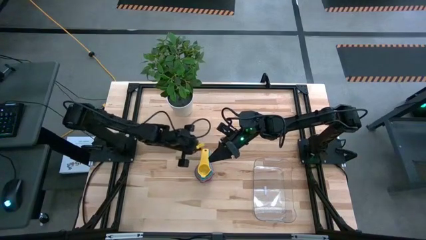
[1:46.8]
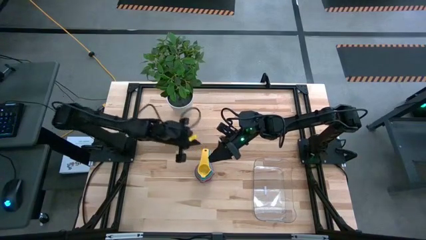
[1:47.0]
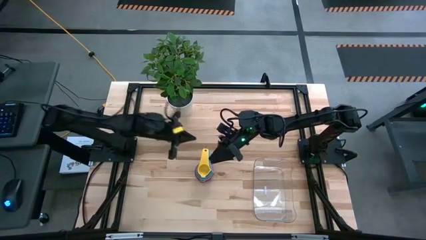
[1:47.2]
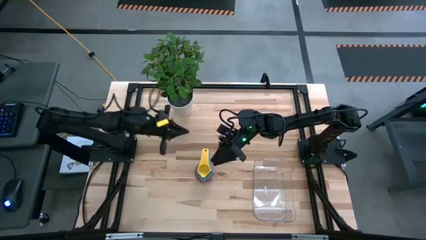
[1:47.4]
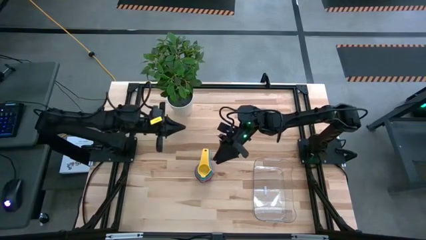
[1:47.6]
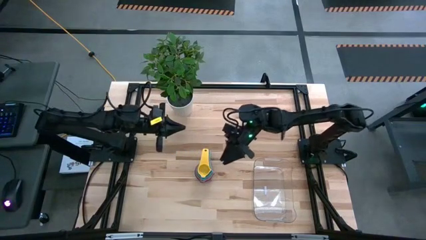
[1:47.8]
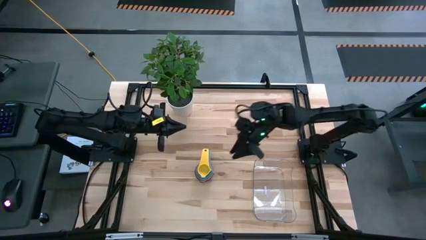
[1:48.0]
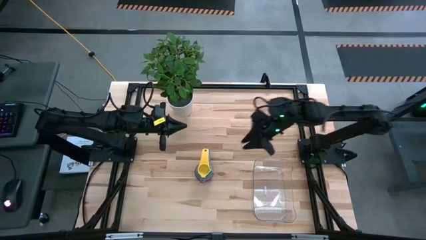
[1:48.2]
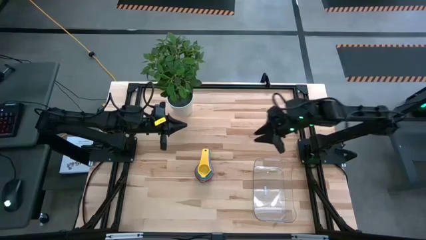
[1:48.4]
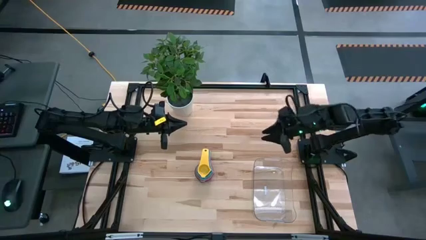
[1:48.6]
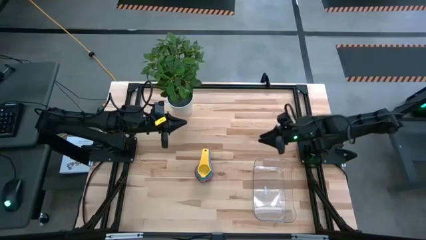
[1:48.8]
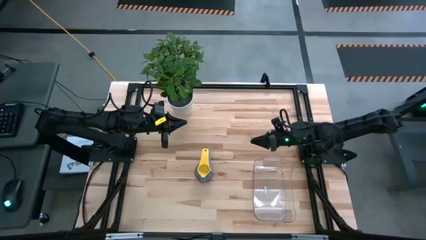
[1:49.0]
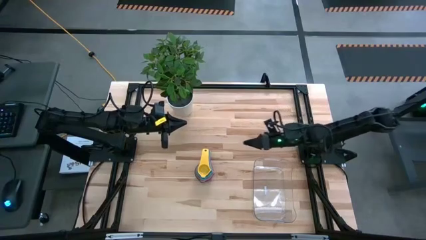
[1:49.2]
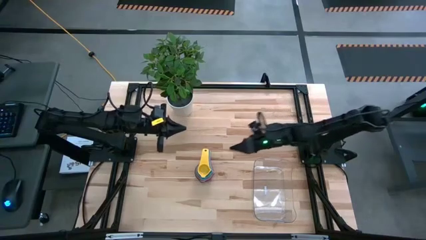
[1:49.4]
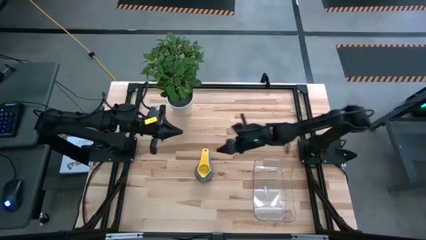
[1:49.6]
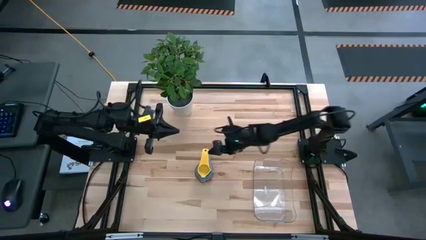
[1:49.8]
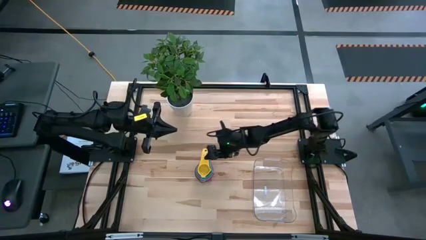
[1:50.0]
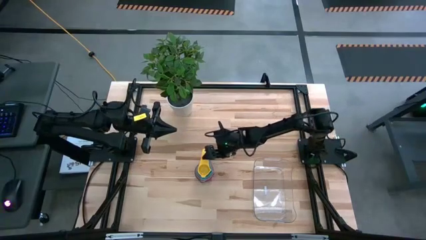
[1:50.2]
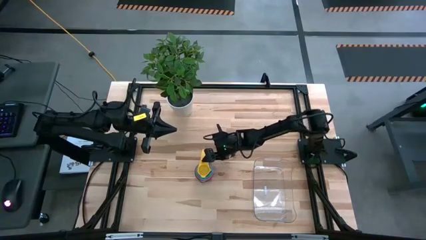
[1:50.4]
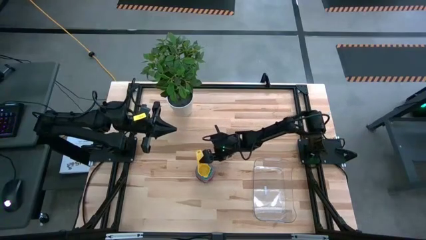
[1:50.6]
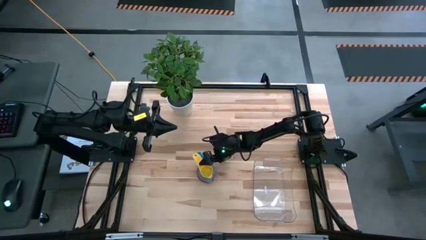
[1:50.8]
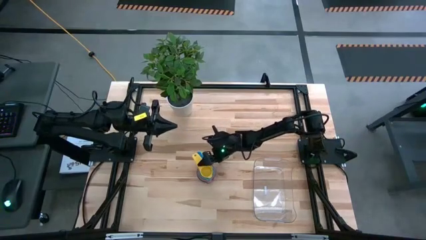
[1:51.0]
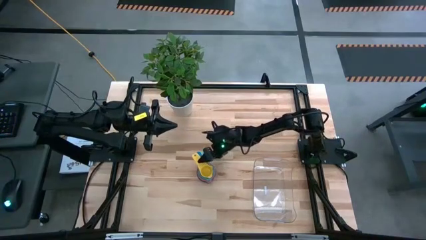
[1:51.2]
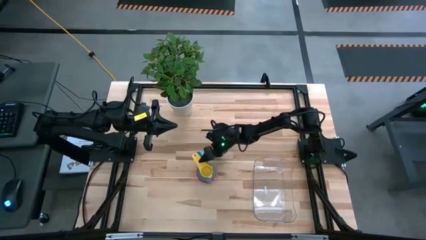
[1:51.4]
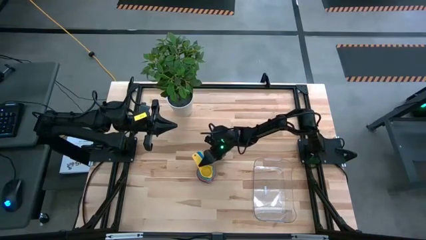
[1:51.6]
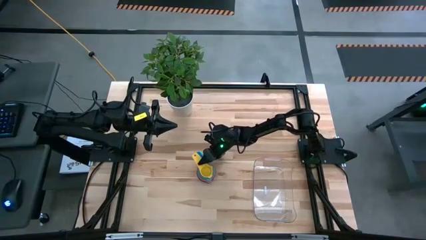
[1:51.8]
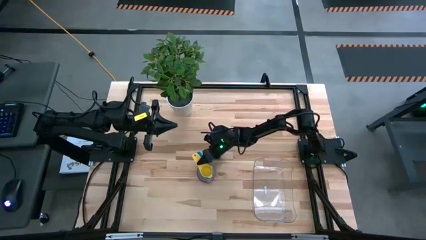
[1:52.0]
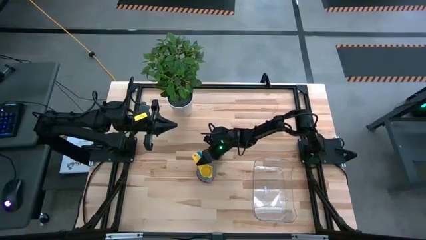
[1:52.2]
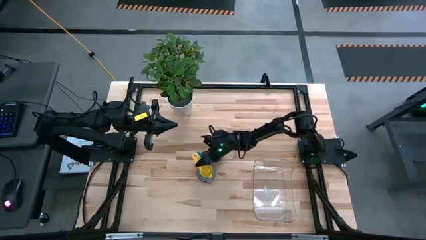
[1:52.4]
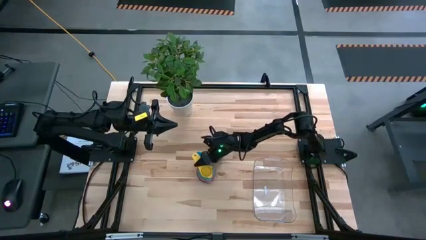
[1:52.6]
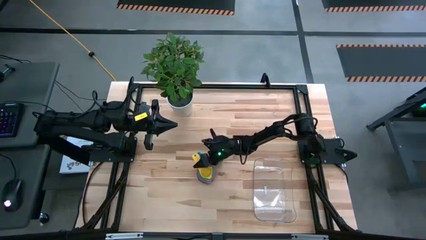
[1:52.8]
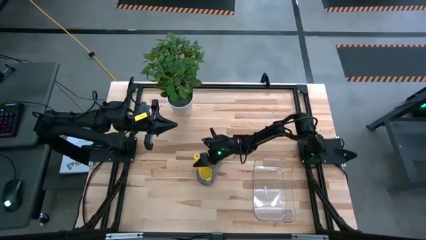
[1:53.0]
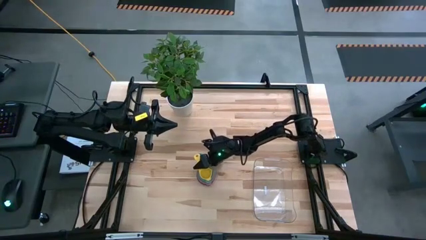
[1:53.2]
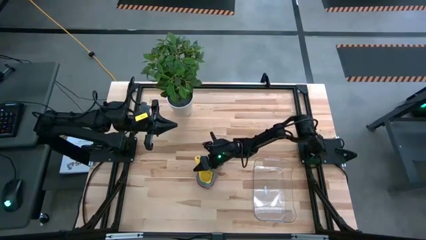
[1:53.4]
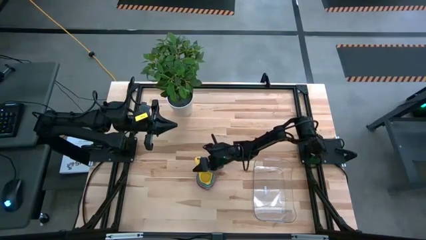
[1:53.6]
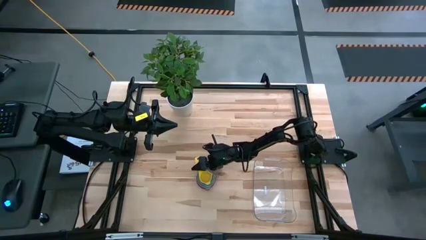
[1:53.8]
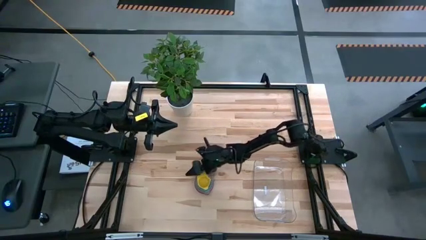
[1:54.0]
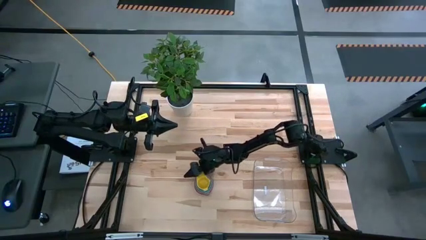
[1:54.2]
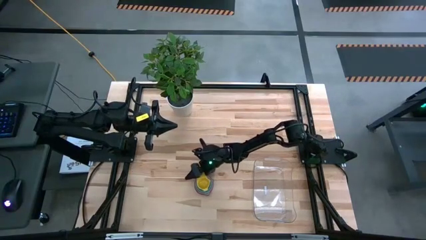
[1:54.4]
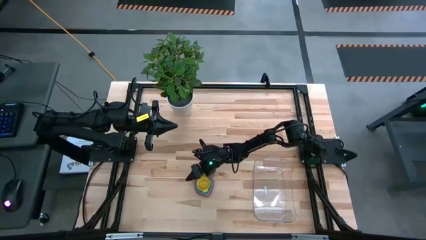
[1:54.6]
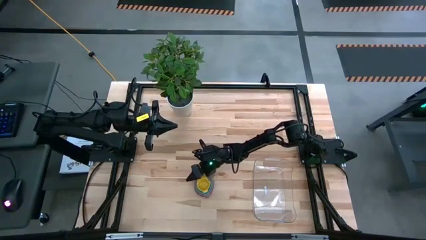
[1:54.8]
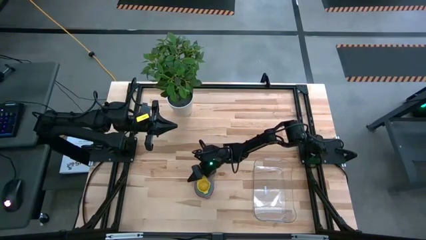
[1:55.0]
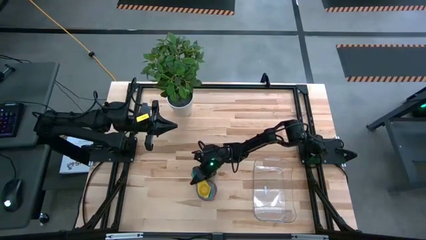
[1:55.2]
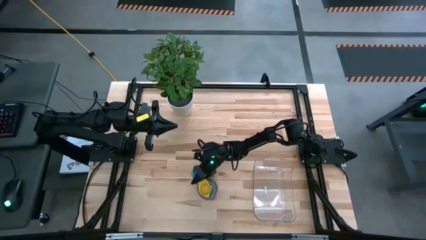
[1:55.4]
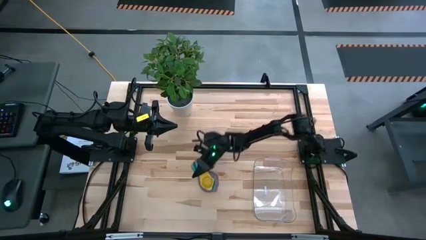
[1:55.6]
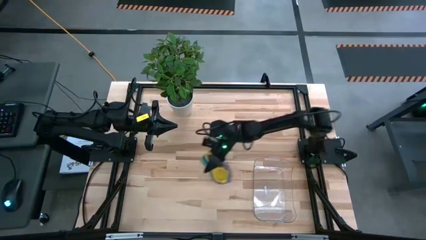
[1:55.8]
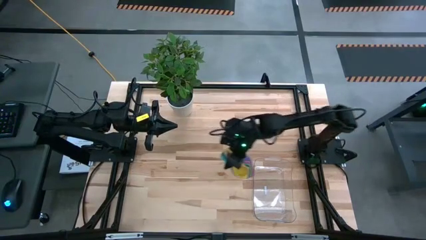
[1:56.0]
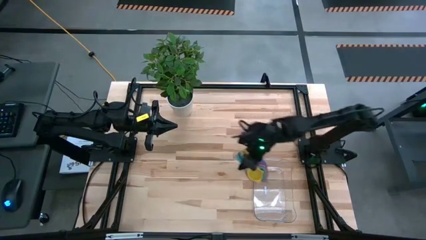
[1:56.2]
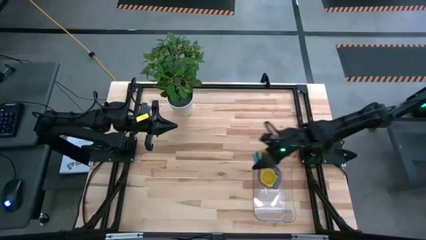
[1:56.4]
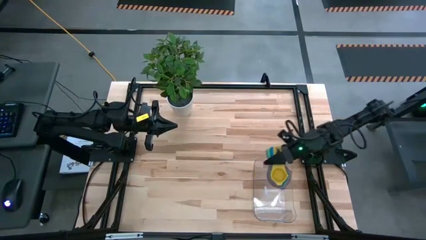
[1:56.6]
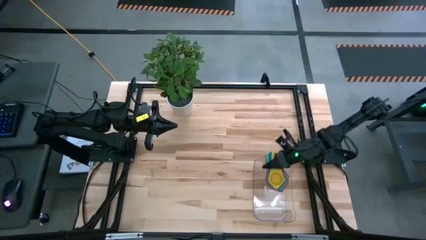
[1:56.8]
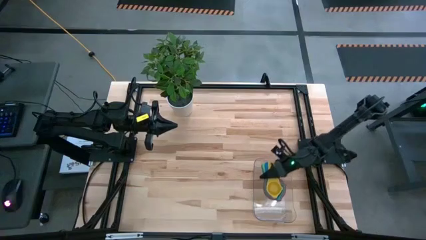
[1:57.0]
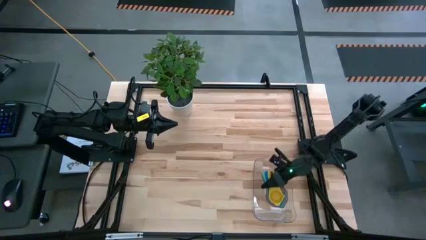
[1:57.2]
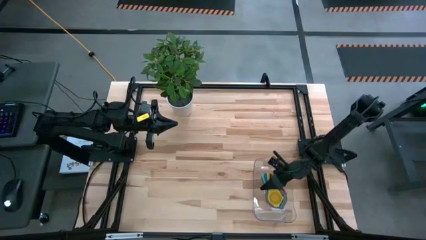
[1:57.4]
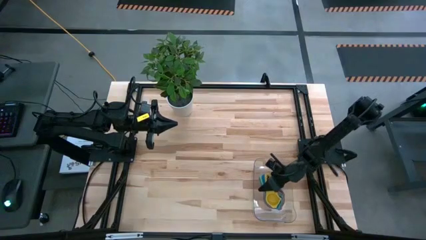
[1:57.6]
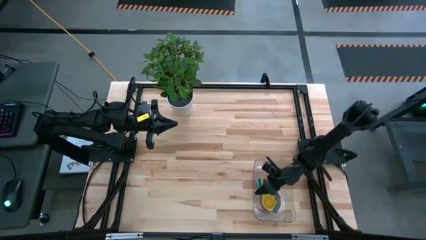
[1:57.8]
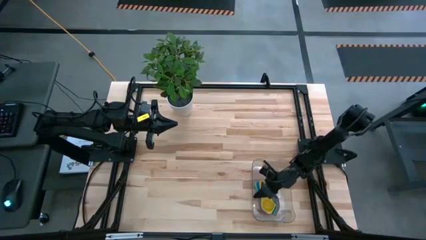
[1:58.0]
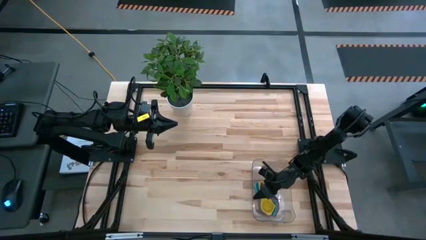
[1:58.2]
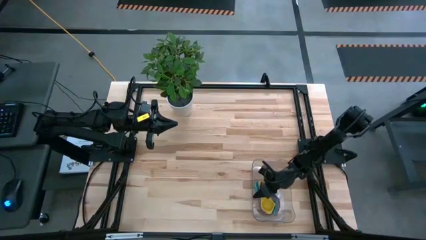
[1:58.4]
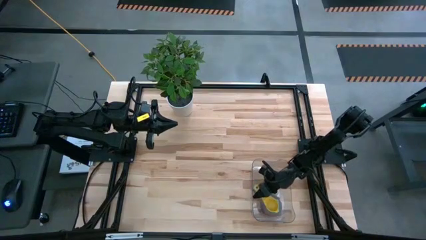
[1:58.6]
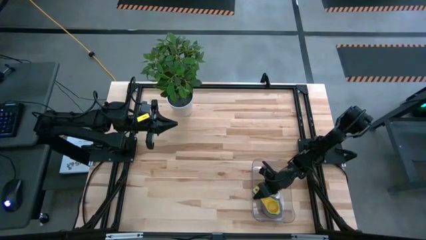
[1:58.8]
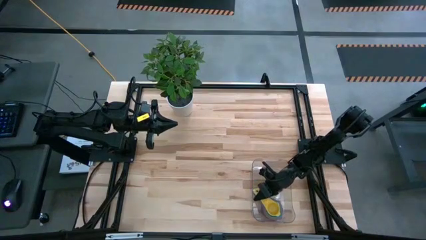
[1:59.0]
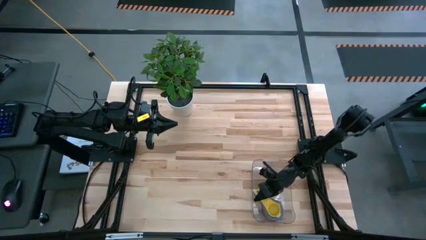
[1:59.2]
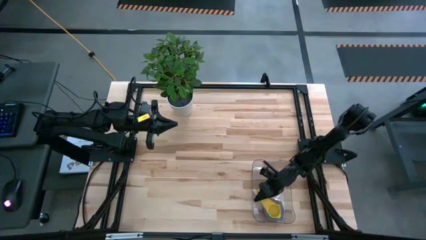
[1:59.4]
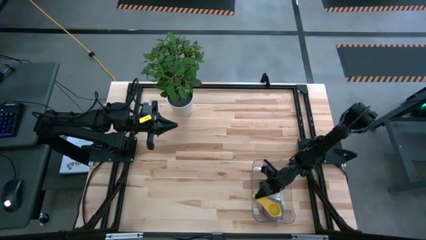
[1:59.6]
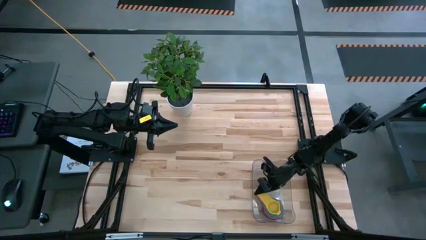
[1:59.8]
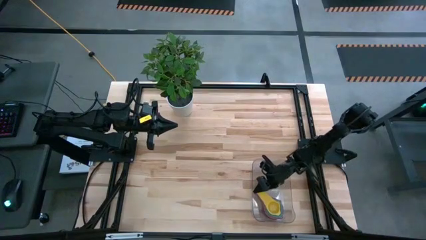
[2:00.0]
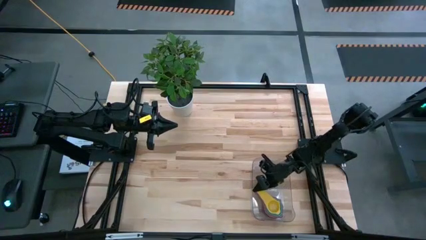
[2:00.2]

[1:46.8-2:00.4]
Task: Nest measuring cups in basket
Put the stacked measuring cups into the transparent bin
